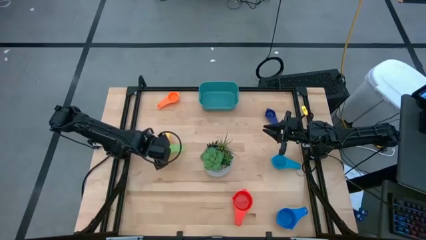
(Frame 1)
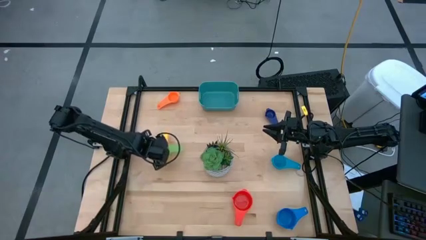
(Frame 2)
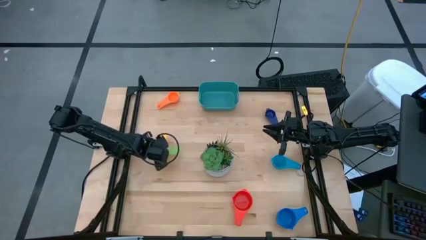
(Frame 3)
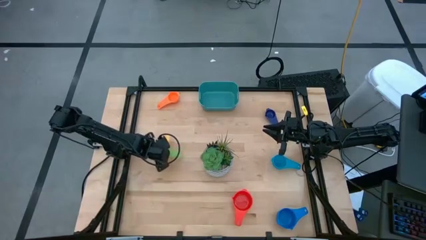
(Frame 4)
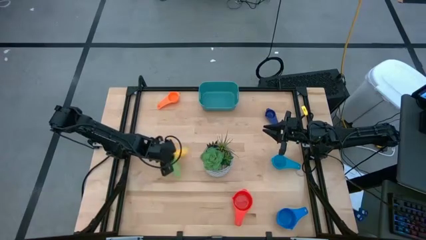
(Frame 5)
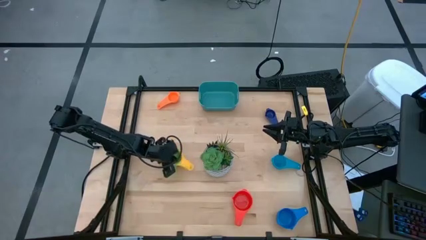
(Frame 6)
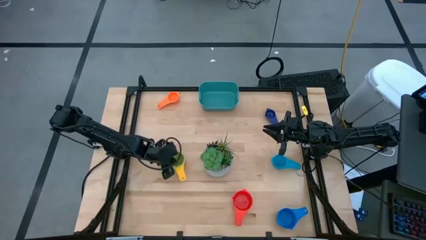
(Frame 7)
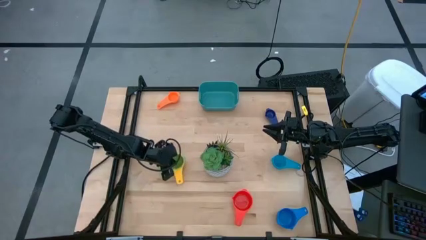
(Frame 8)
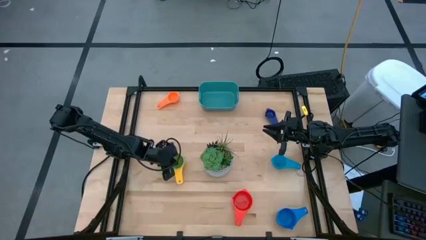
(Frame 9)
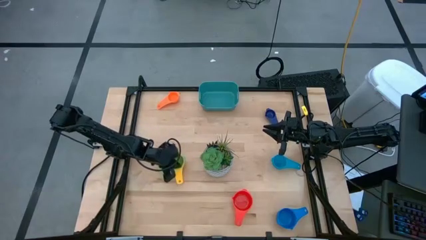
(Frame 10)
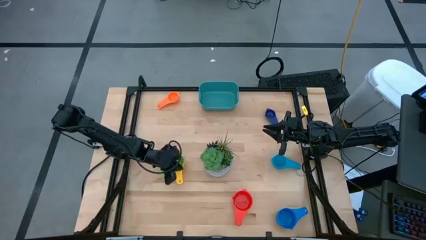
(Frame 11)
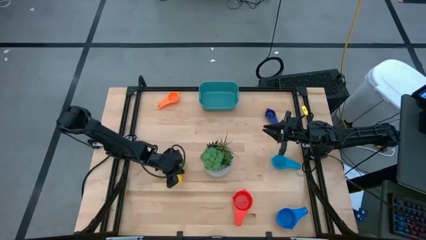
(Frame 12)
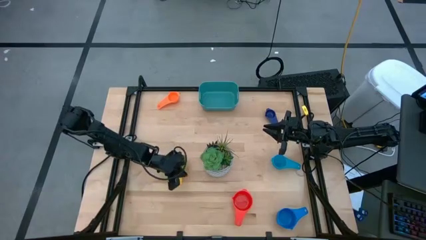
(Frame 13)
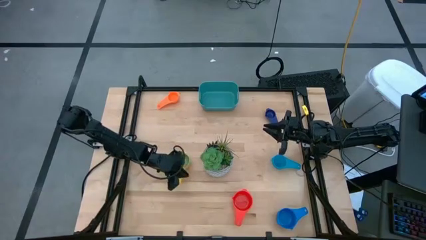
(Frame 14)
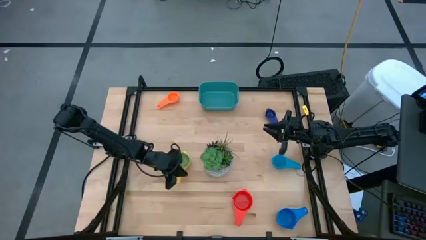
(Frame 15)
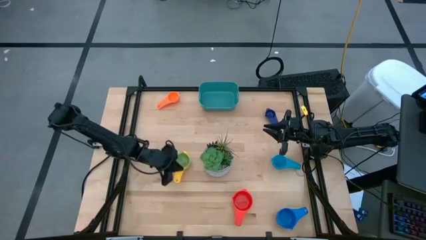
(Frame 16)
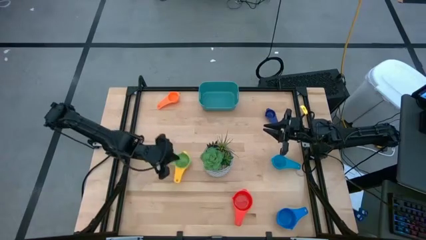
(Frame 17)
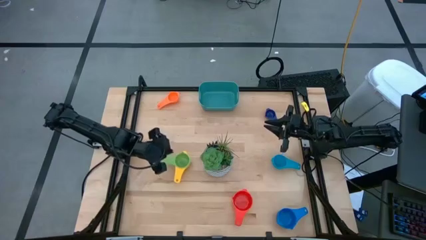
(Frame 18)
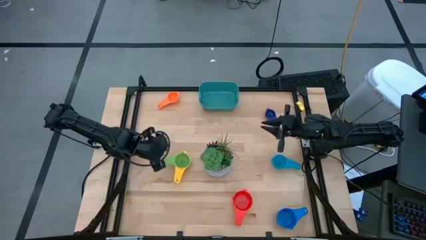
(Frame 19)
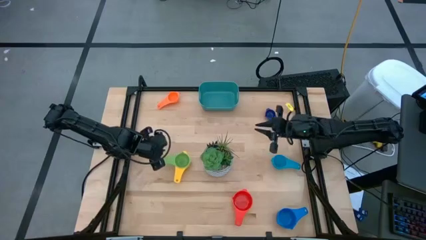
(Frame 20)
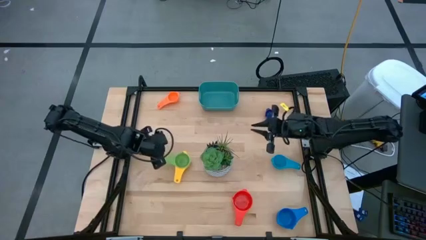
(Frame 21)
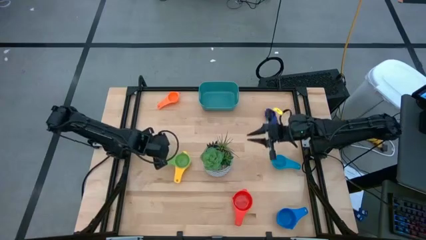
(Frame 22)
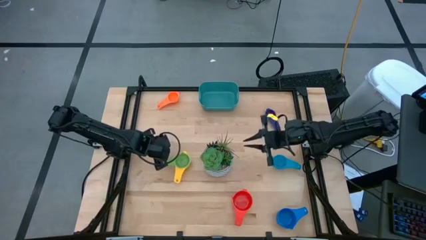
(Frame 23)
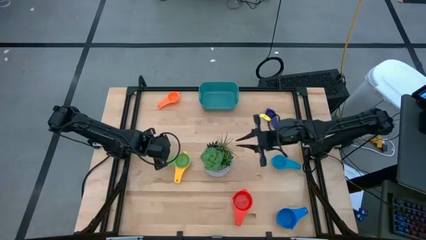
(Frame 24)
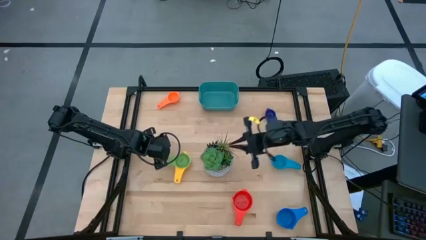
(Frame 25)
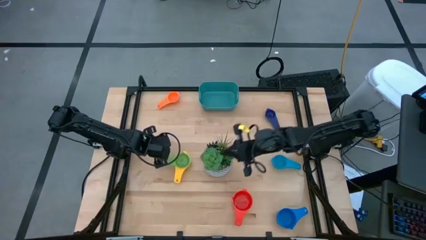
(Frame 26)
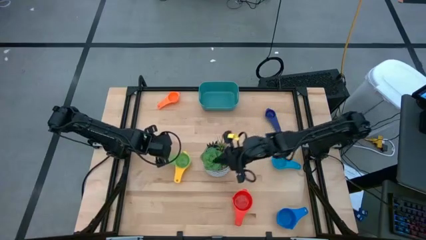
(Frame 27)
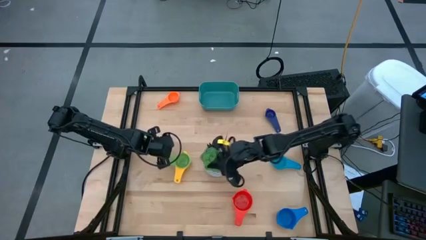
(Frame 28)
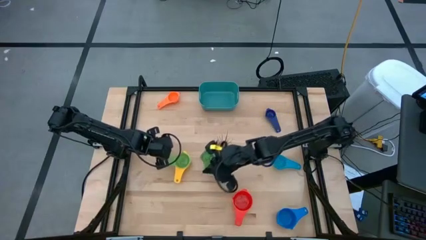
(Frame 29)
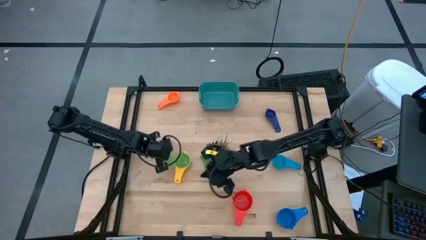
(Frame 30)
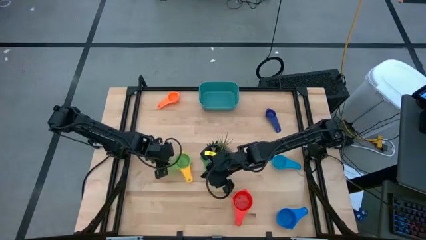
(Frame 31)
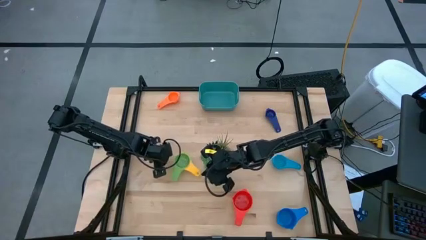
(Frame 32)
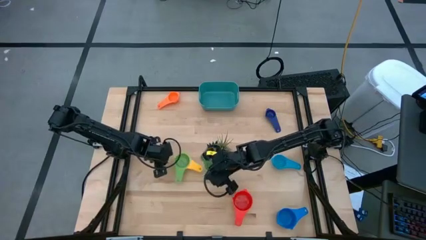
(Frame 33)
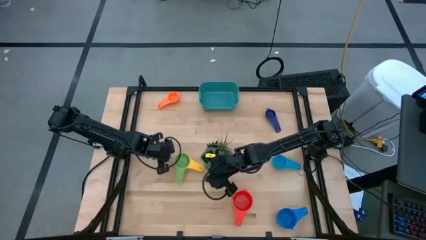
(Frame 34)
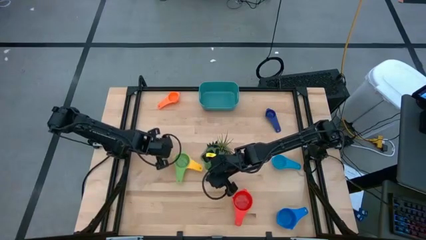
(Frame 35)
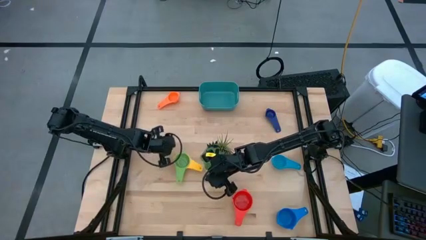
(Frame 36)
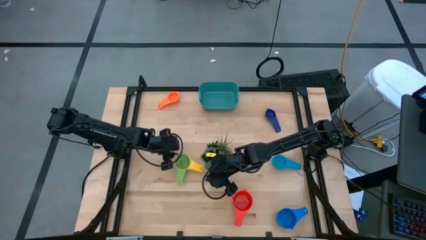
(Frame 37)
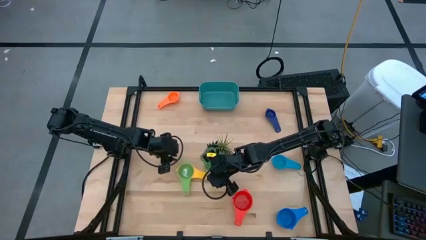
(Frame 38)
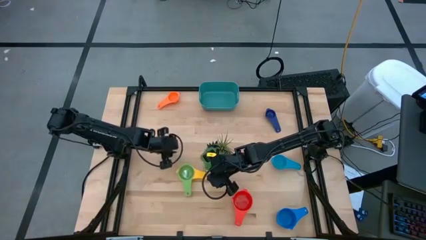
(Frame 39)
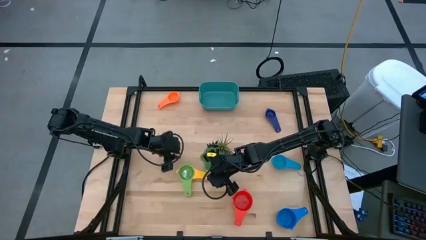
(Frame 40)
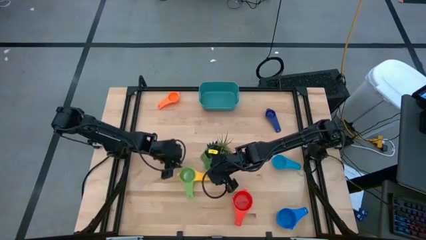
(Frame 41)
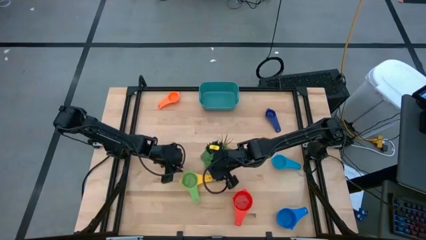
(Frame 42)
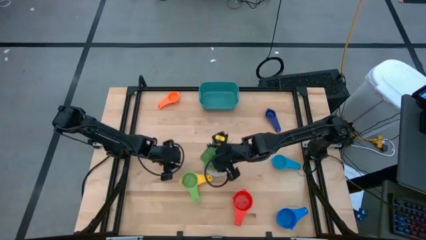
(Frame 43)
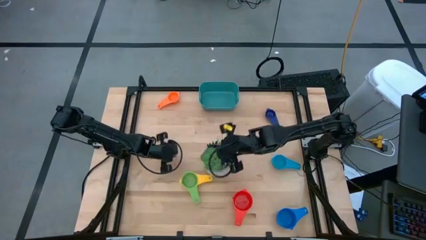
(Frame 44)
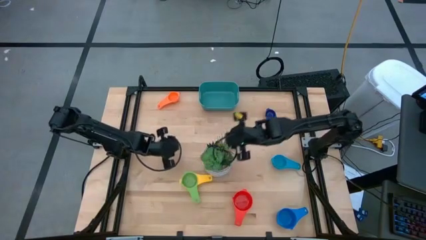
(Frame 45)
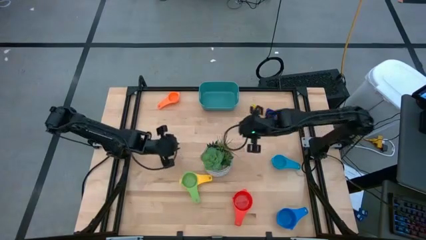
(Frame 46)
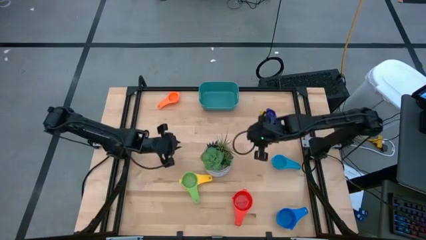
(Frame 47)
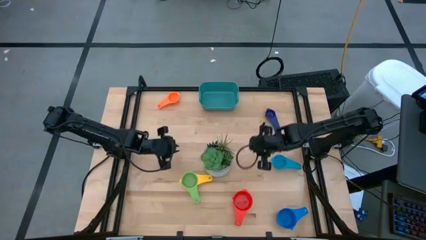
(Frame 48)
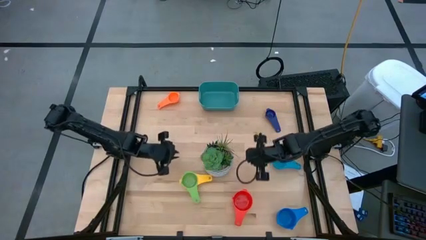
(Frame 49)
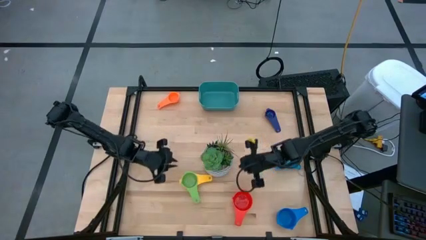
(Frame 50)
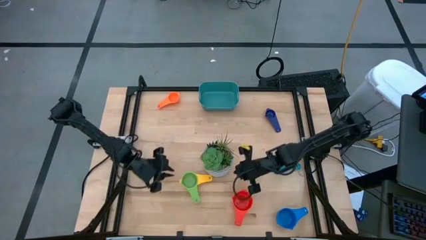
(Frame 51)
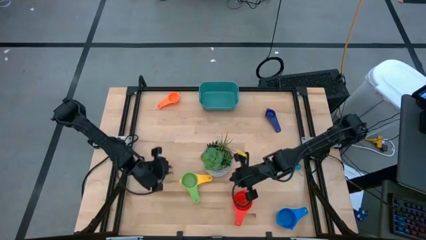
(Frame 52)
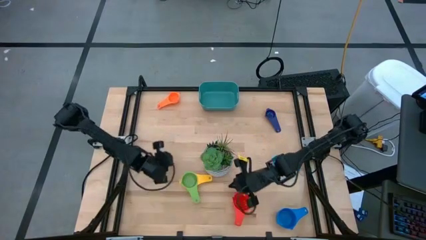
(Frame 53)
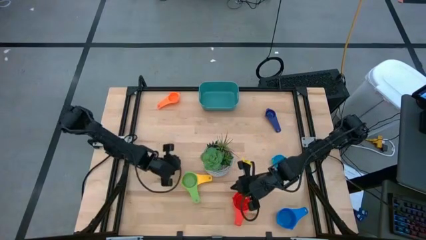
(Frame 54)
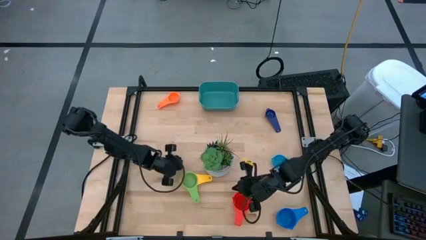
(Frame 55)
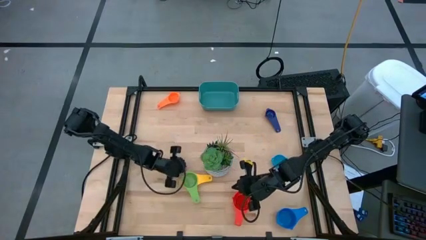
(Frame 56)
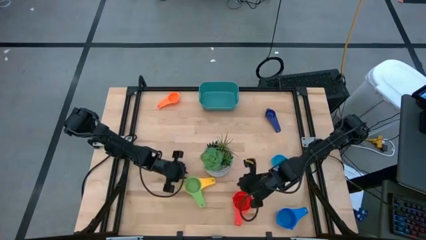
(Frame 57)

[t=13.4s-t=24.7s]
Task: Nest measuring cups in basket
Stack the green measuring cup on top the yellow measuring cup
